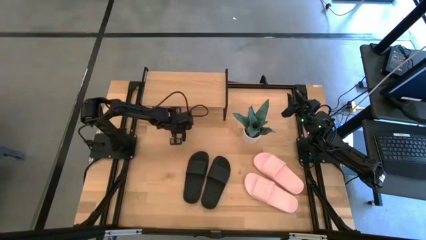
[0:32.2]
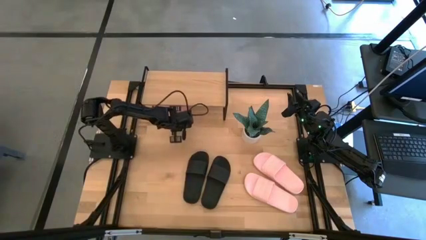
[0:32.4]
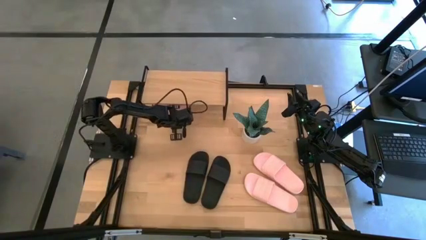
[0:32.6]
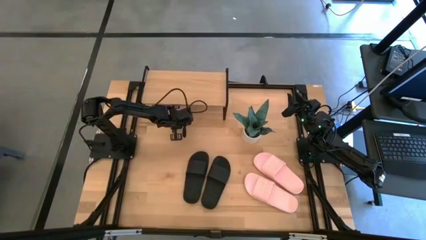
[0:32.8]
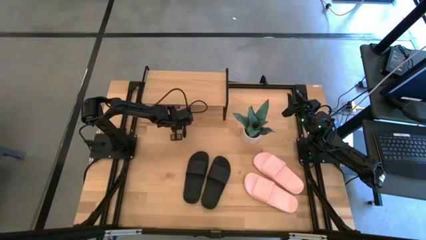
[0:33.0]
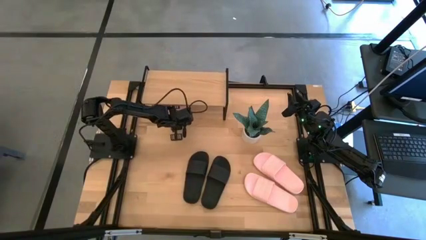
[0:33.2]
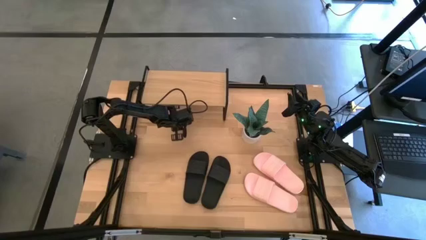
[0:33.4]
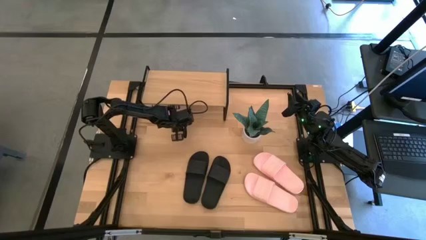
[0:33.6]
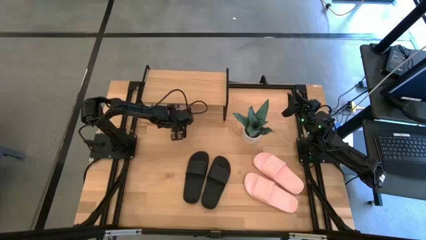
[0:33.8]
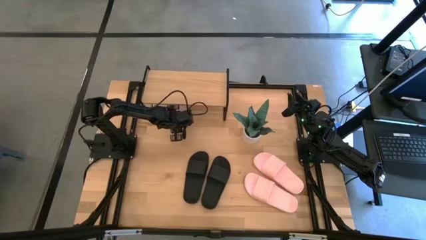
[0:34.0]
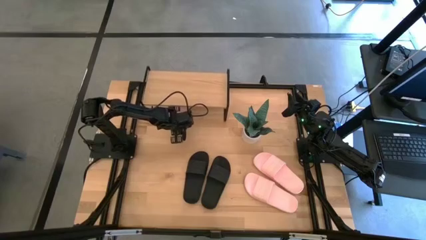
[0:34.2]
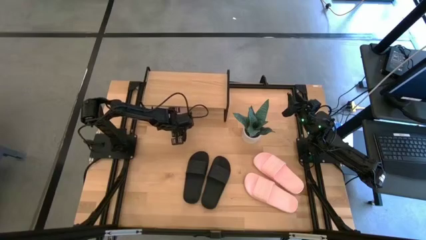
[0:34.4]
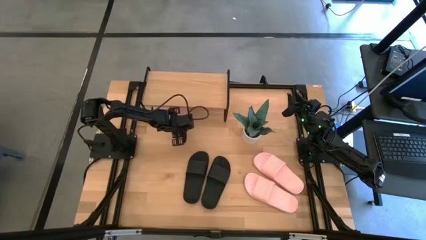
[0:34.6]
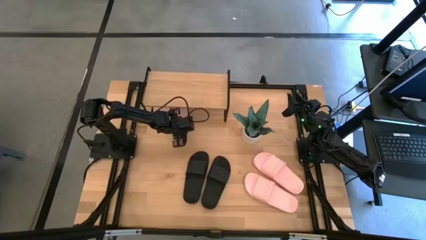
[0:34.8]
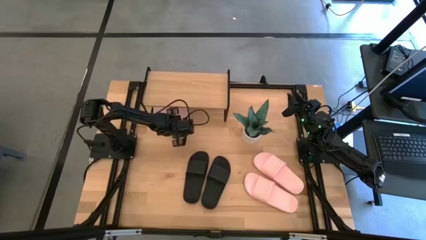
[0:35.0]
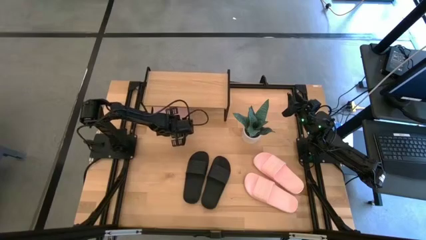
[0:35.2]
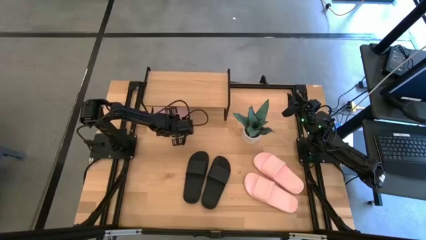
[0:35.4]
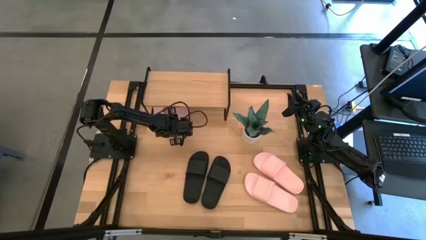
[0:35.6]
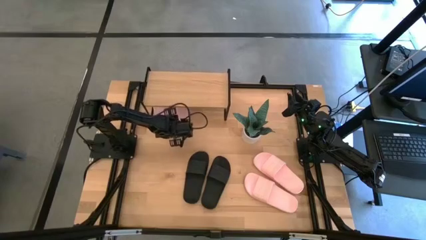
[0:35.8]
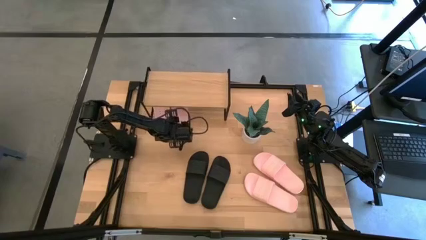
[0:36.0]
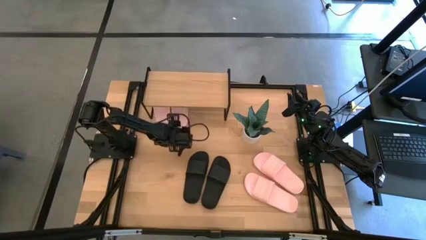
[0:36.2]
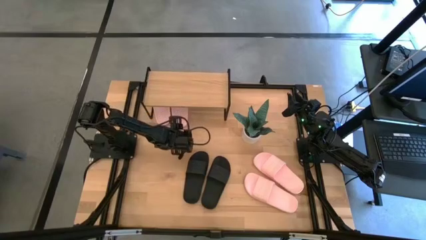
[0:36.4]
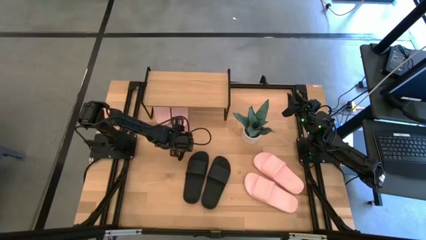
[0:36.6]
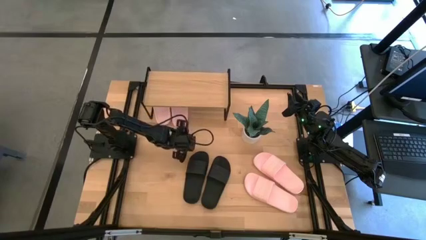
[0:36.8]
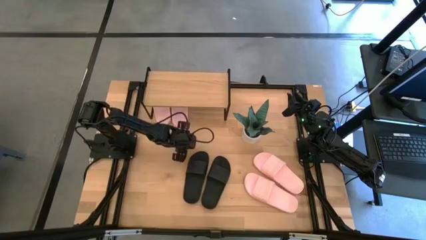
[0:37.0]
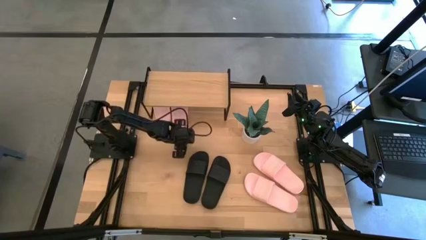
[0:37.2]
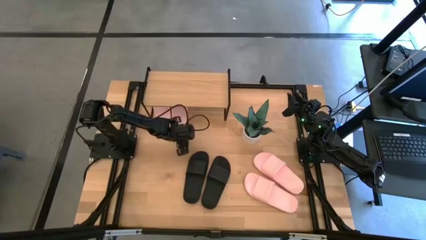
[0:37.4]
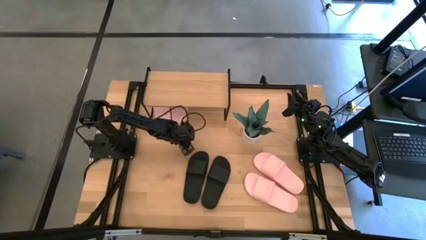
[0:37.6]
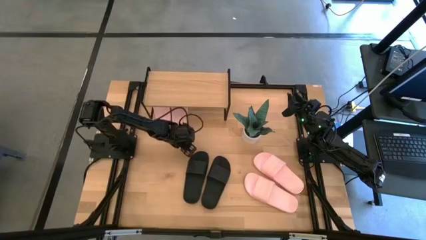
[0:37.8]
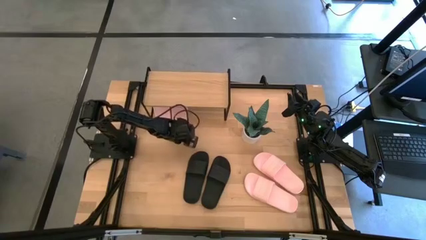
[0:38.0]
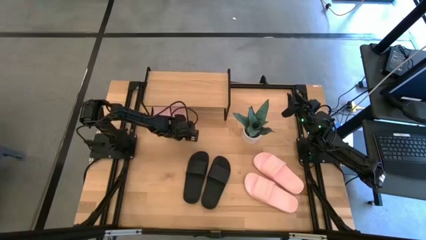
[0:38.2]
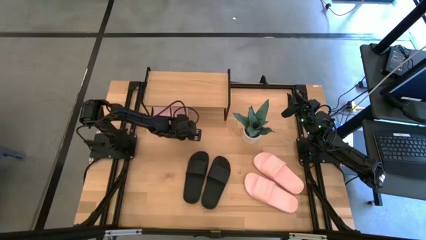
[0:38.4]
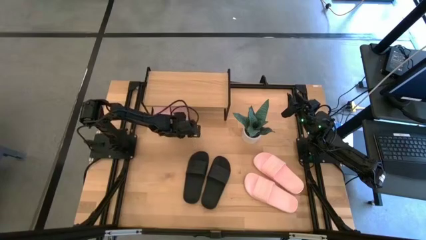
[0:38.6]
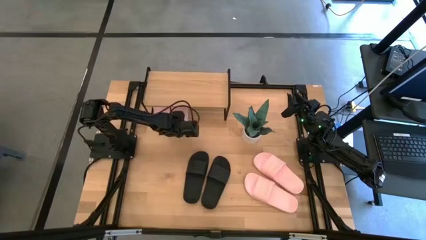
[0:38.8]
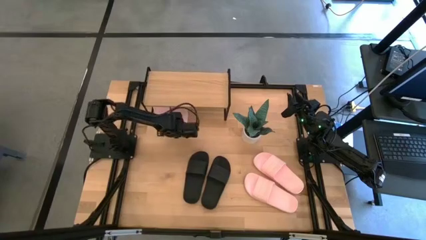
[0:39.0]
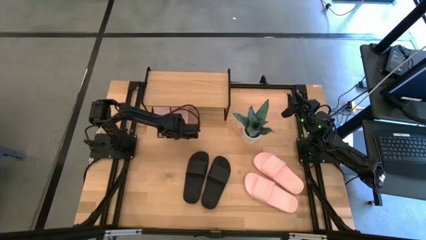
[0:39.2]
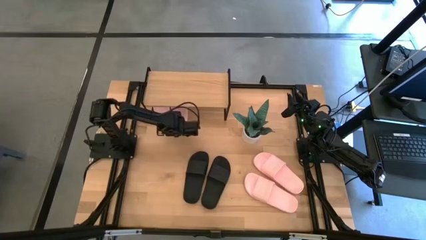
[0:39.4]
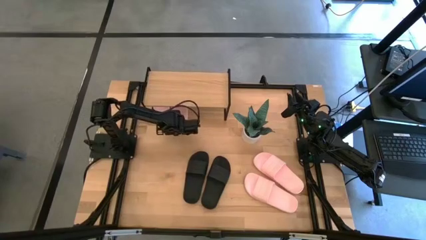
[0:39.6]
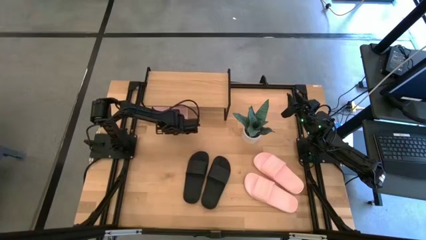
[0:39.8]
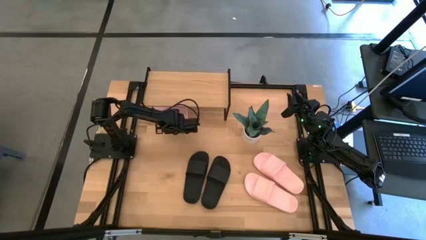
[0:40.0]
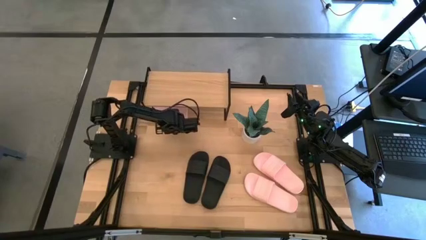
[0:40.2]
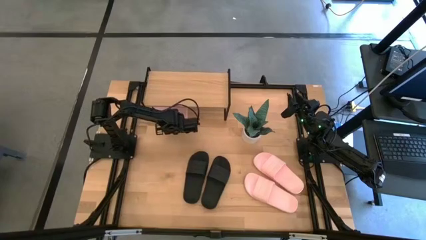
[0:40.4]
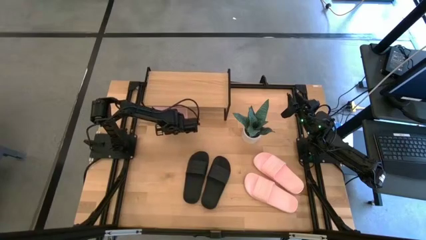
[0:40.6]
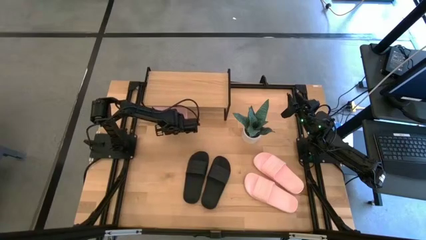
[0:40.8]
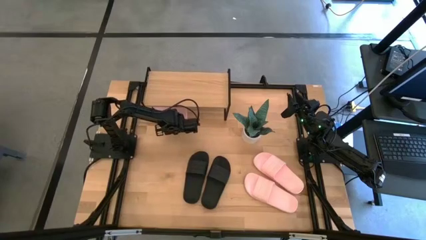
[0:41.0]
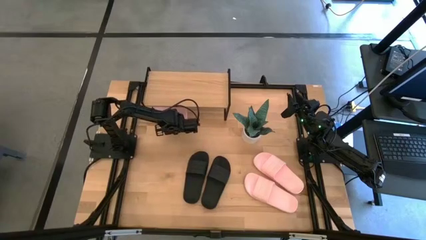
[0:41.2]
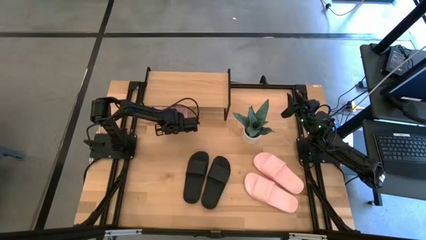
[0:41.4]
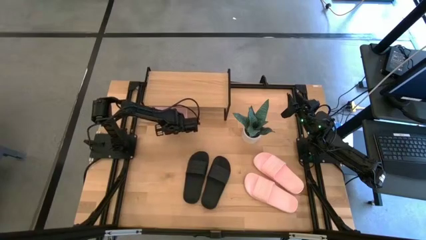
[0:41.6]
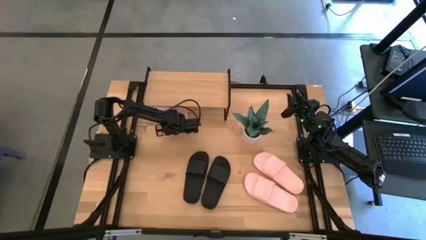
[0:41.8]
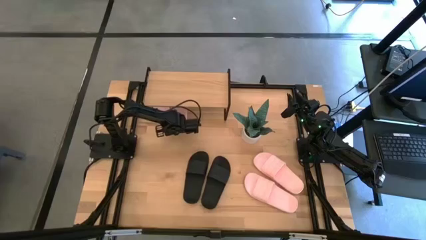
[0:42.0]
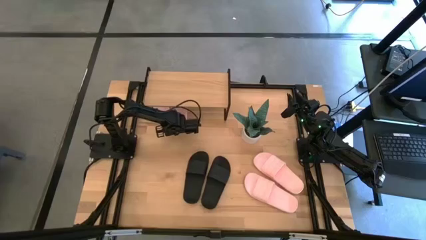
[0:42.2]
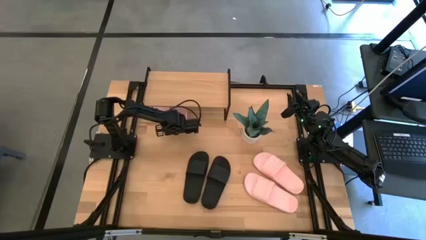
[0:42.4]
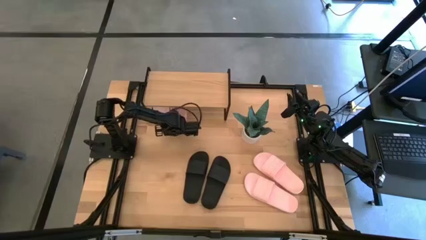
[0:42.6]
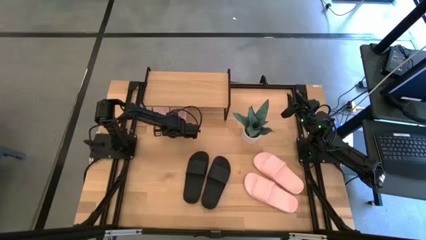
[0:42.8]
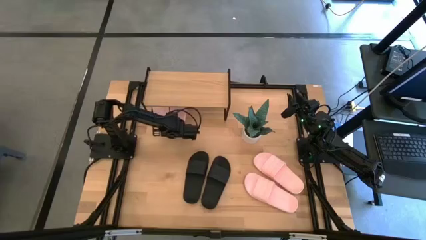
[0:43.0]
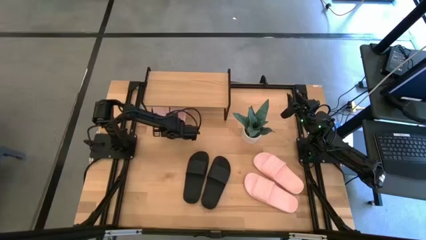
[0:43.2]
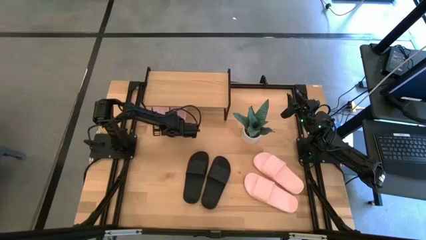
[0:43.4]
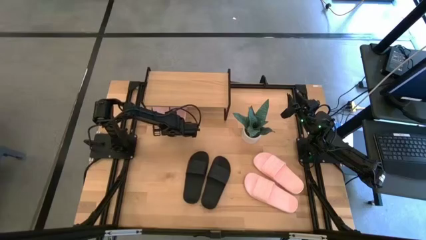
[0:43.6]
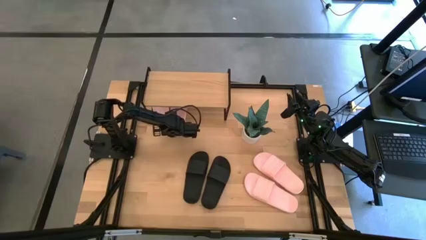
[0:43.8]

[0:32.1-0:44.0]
Task: Pick and place slides into the shelf
Put the pink slipper under the shelf

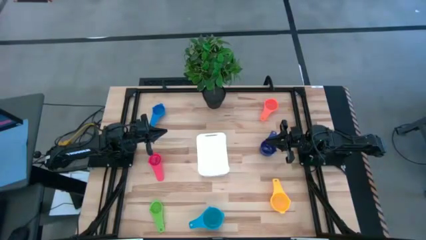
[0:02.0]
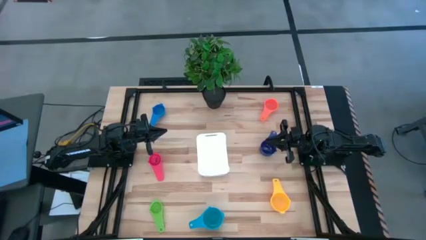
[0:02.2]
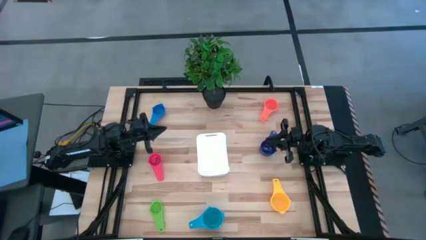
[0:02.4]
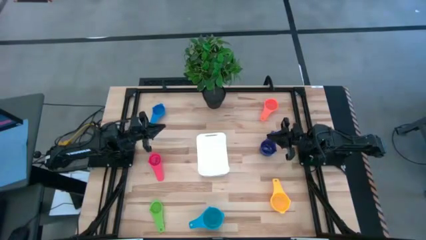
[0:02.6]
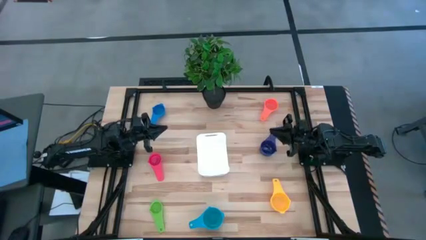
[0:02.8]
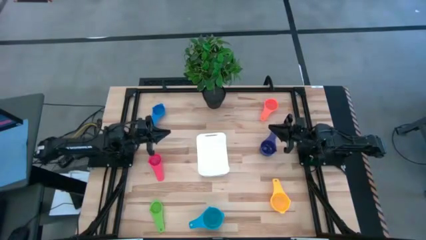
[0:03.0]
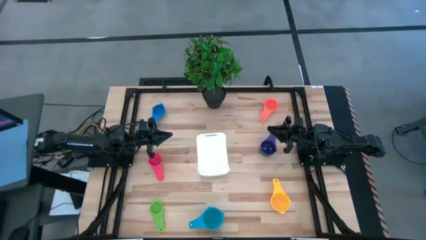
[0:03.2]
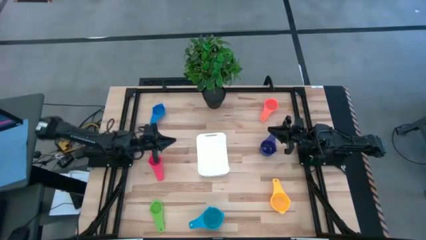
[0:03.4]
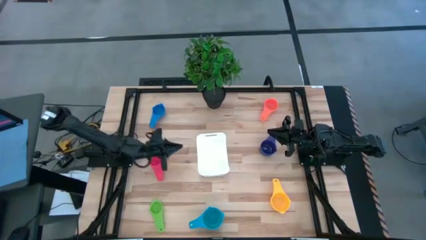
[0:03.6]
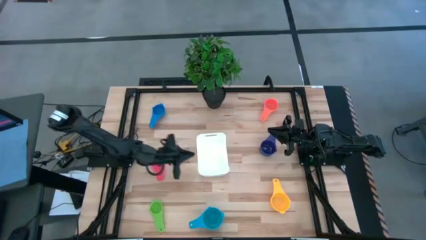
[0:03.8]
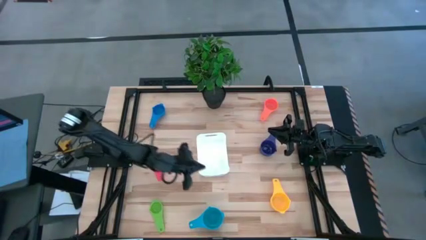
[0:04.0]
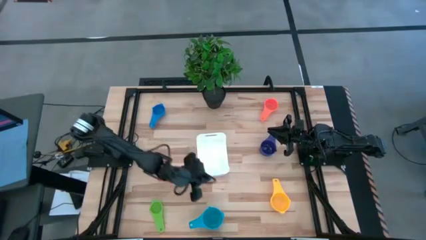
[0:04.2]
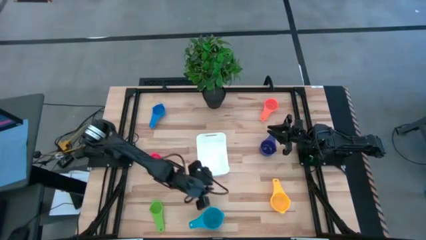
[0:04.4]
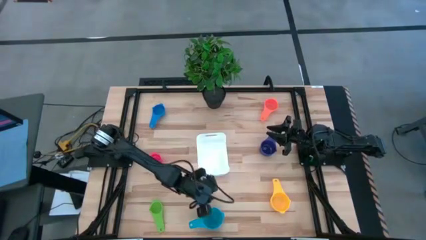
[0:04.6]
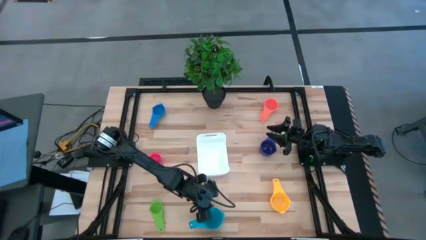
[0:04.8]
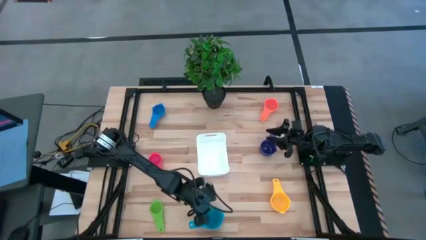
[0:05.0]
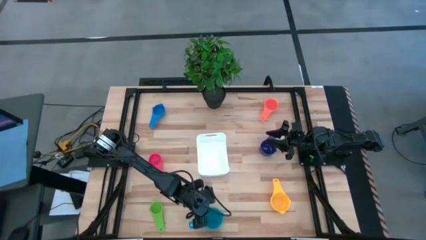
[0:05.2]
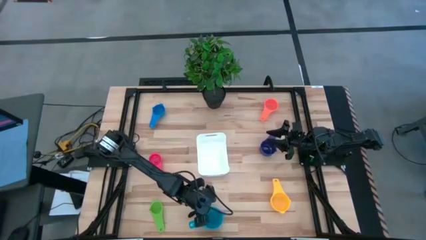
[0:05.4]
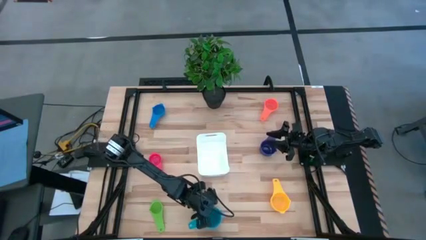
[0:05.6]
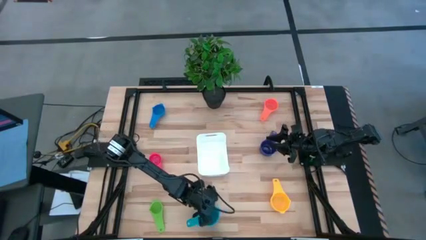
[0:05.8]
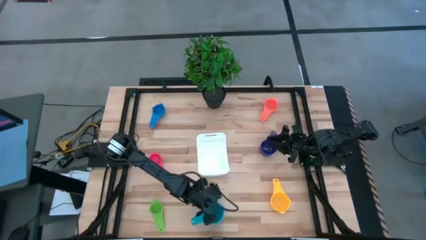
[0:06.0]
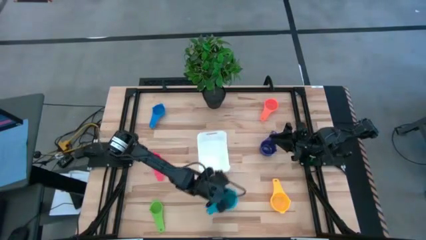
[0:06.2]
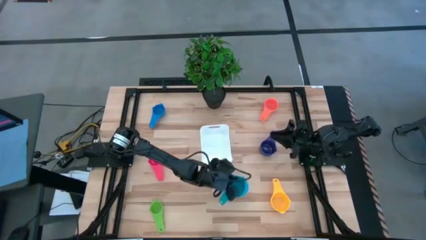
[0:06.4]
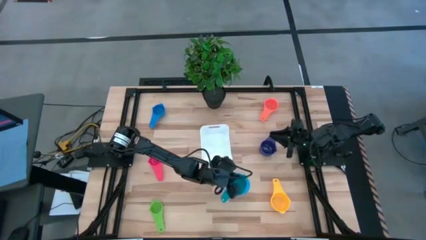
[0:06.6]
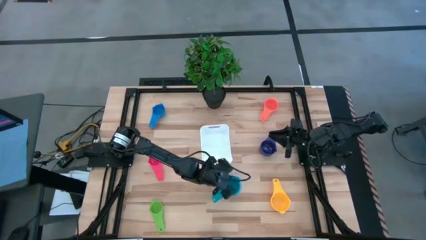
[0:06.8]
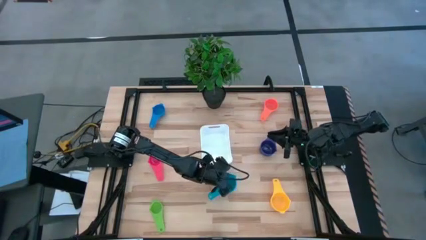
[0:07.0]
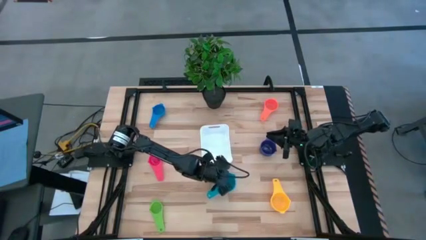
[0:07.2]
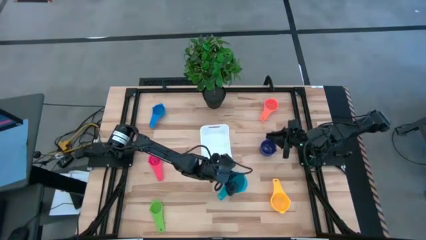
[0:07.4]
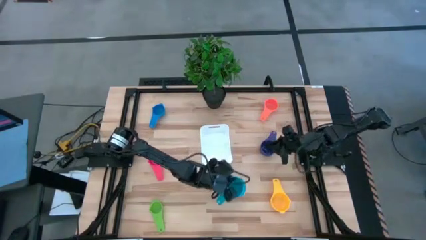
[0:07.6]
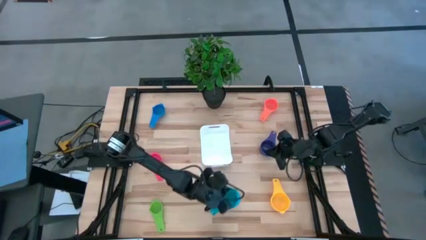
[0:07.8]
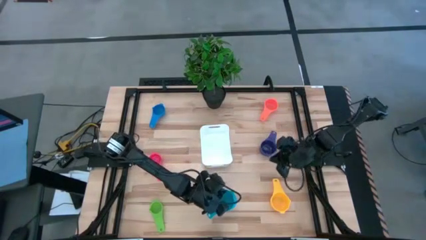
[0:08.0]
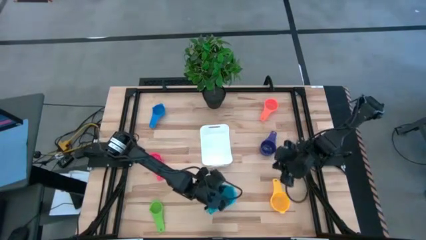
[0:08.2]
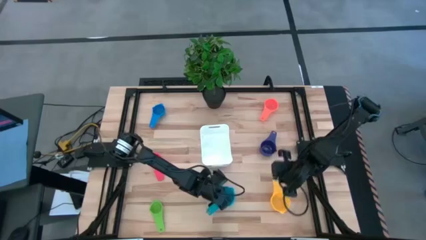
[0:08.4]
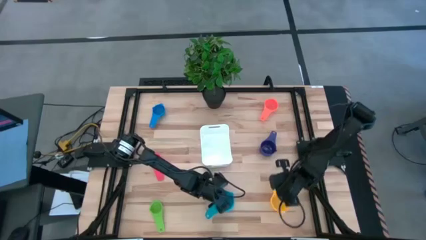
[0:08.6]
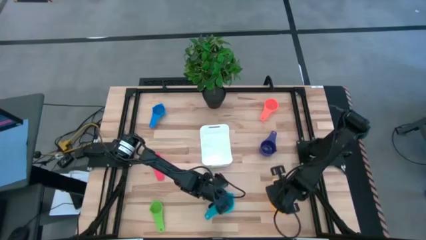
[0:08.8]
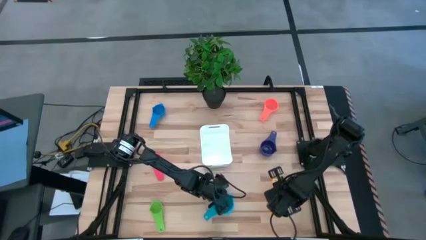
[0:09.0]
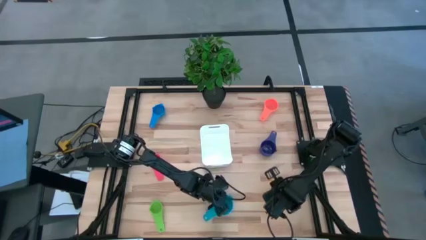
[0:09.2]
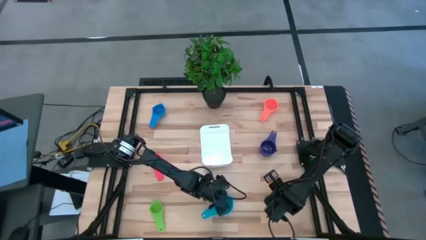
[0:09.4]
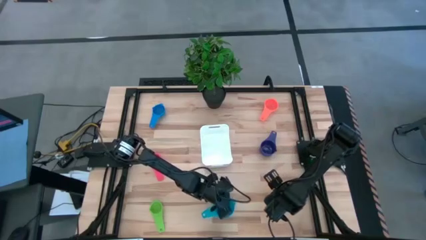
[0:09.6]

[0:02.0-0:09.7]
Task: Nest measuring cups in basket
Prepare the light blue measuring cup
